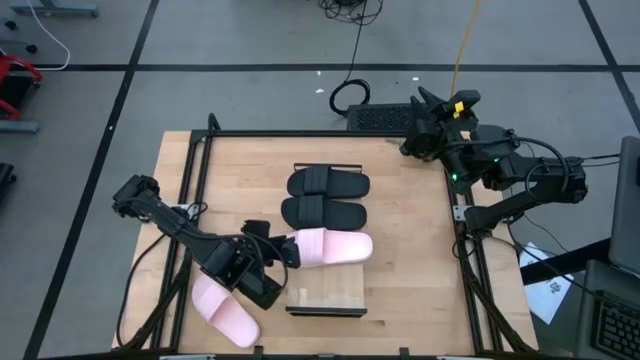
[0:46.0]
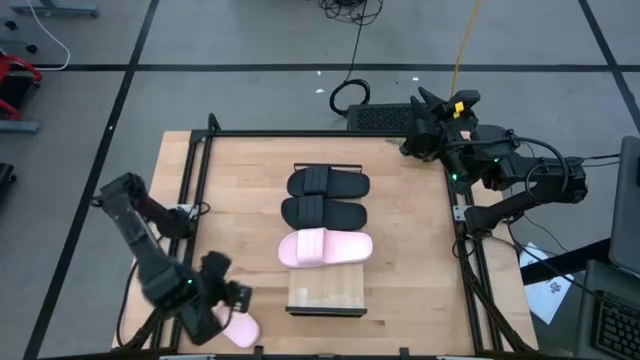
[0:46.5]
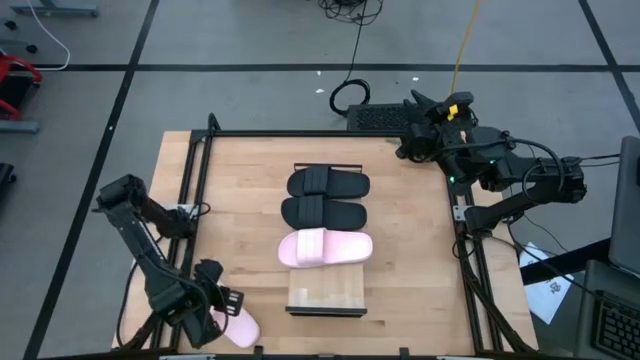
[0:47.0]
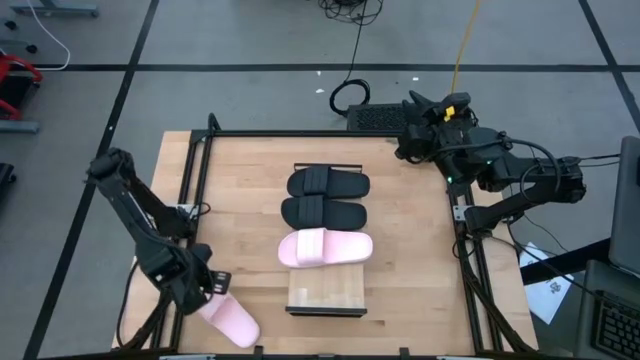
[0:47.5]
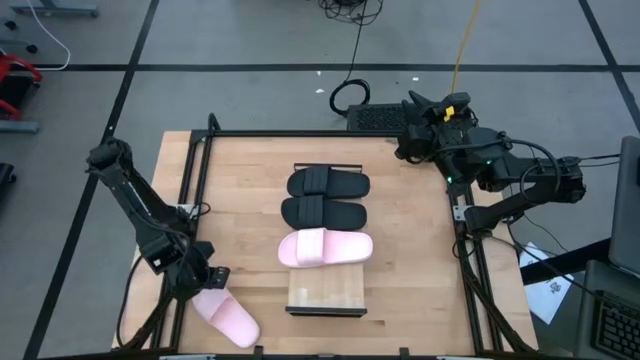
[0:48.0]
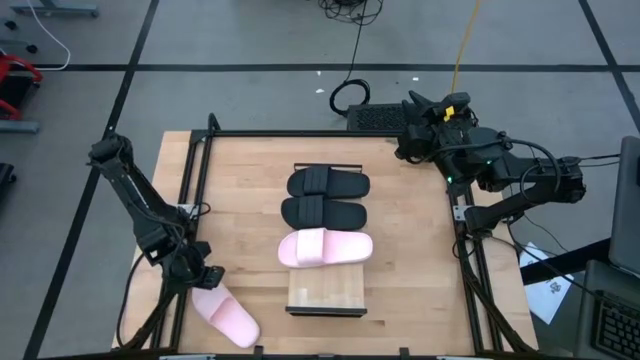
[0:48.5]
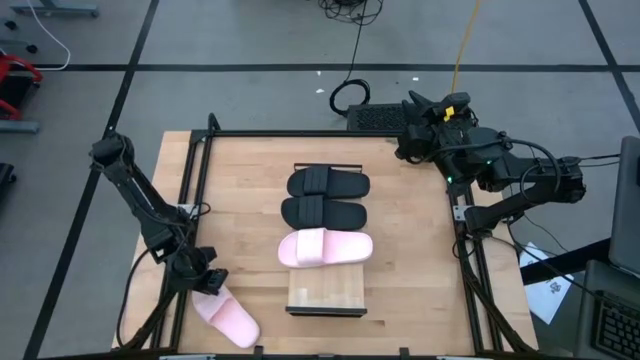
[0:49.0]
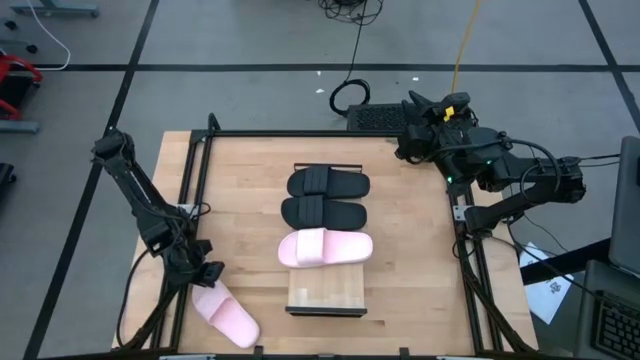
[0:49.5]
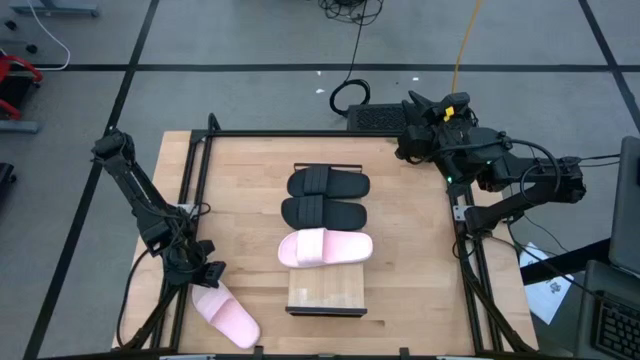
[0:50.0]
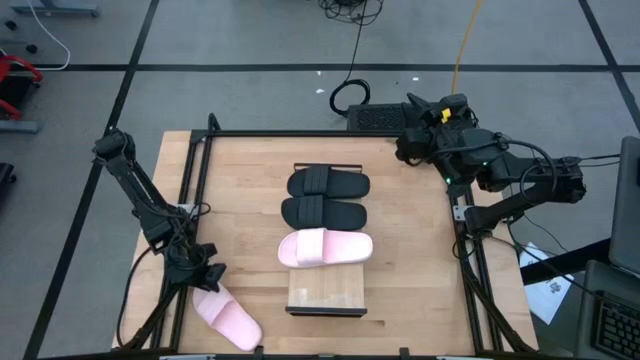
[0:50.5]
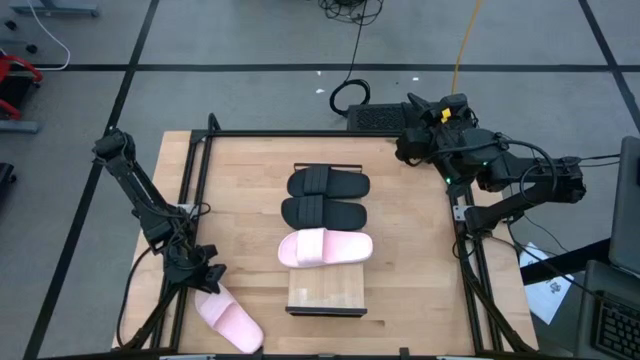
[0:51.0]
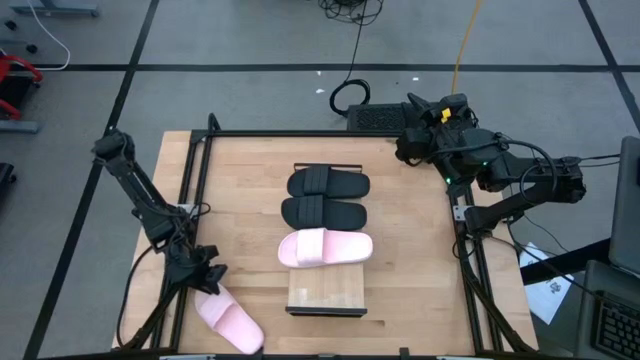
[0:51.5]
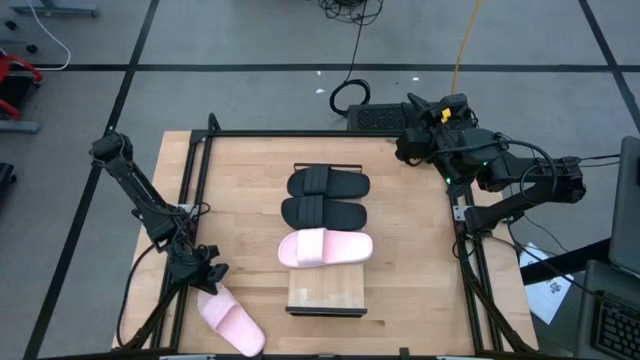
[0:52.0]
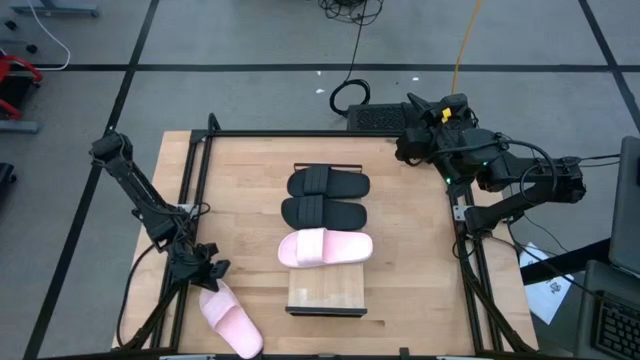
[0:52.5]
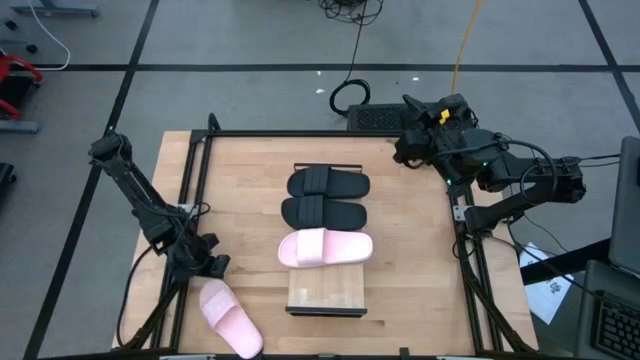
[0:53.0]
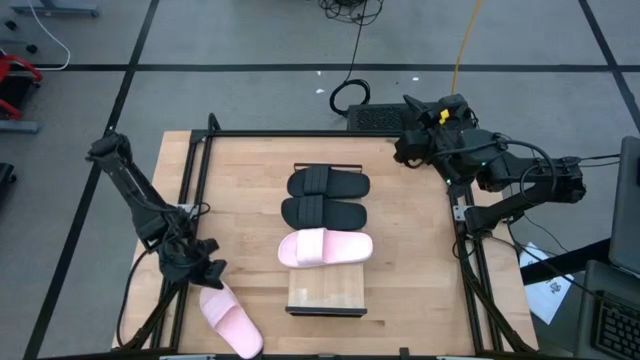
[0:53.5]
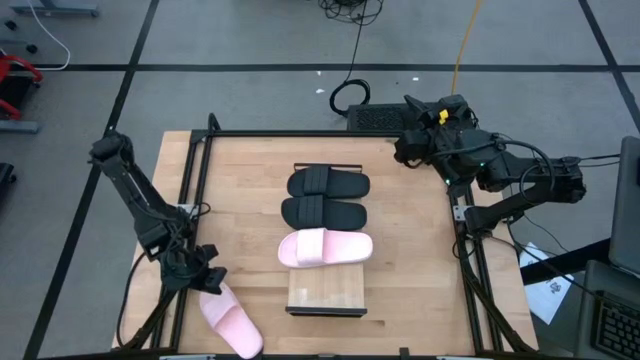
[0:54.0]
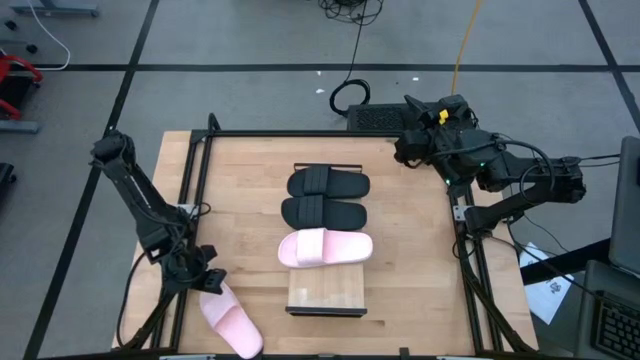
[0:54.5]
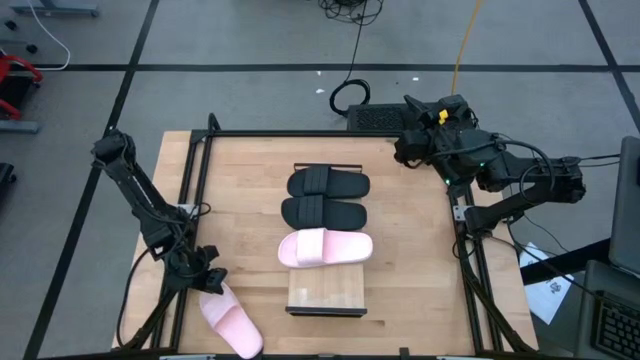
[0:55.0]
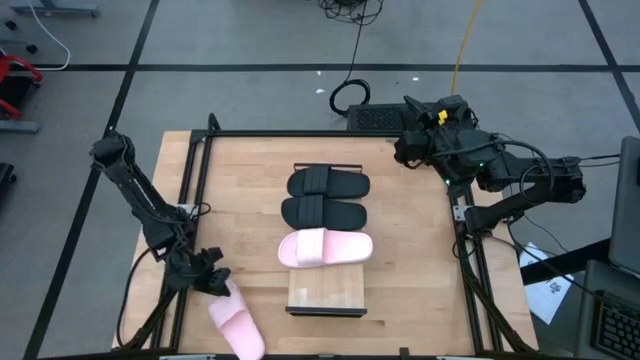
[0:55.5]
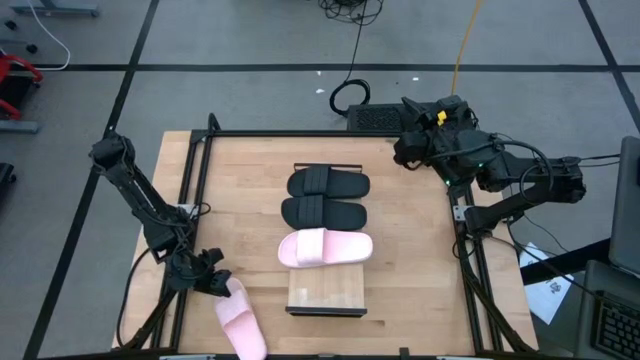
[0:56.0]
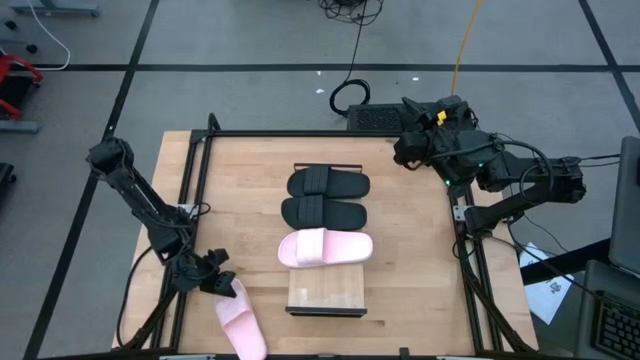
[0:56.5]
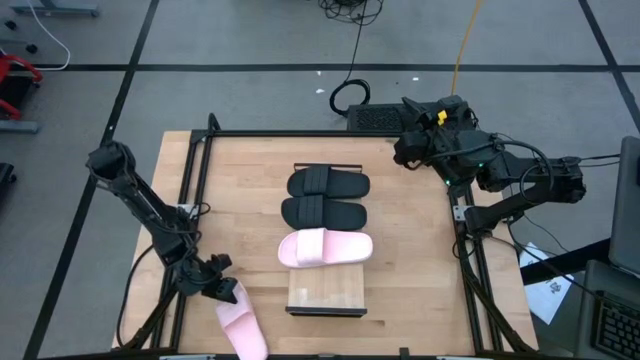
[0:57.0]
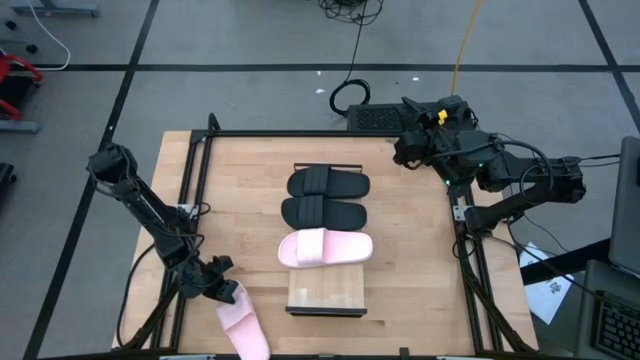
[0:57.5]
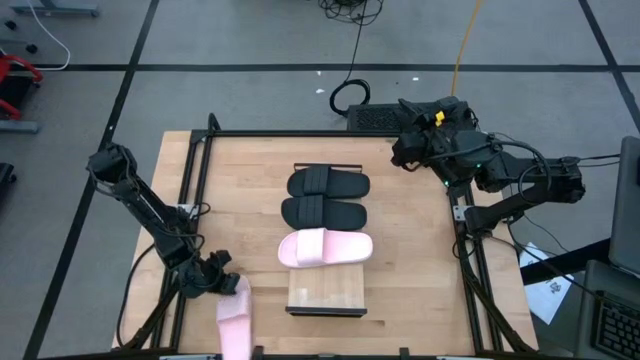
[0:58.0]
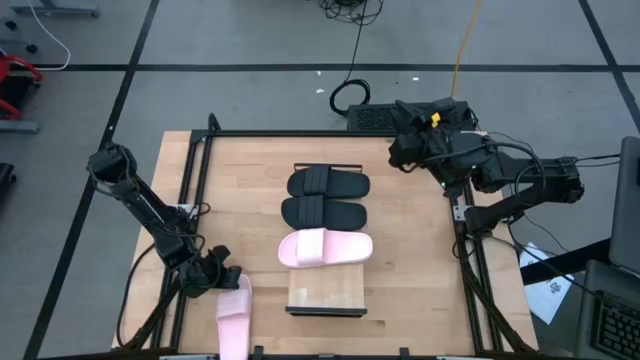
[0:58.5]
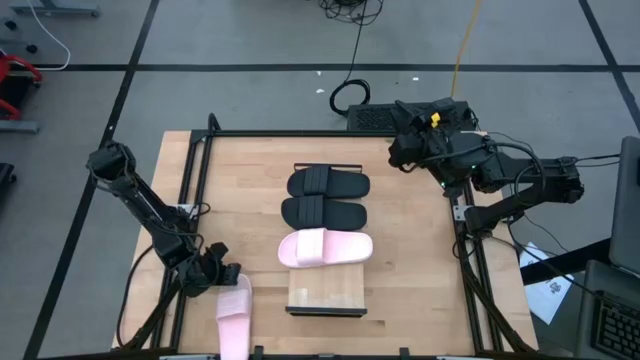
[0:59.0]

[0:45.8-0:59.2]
Task: Pick and place slides into the shelf
Put the pink slide on the shelf

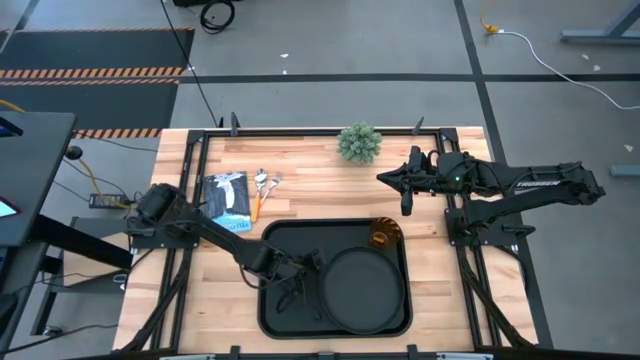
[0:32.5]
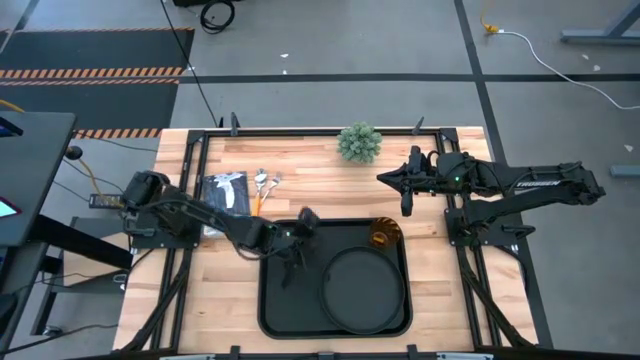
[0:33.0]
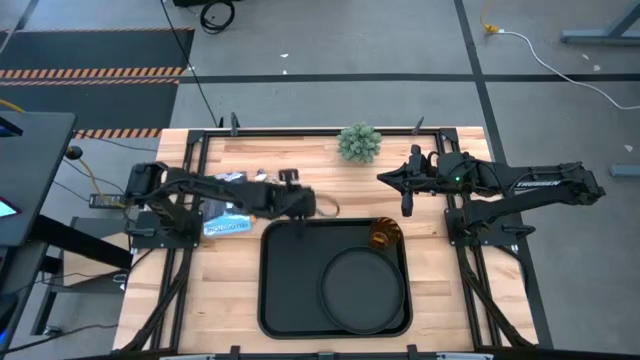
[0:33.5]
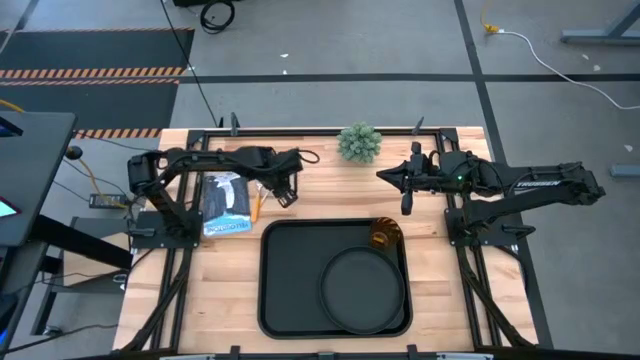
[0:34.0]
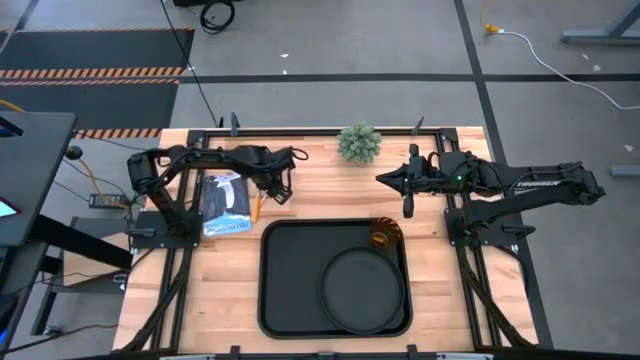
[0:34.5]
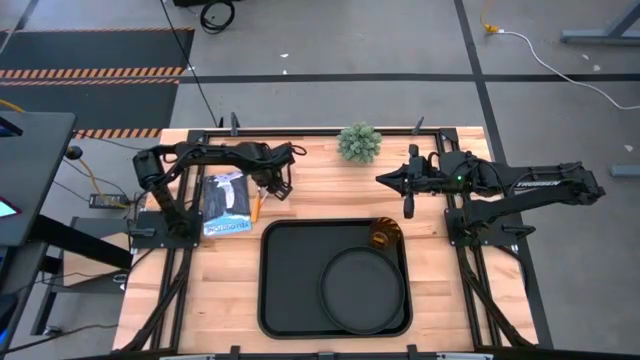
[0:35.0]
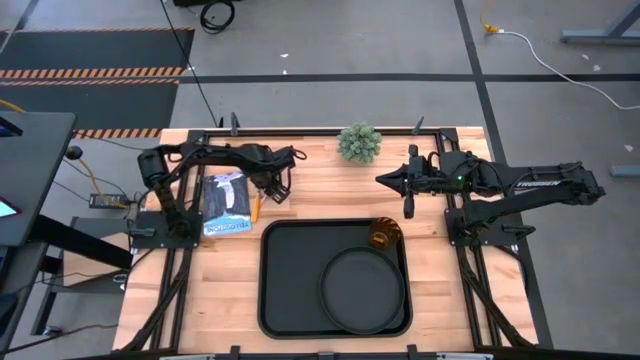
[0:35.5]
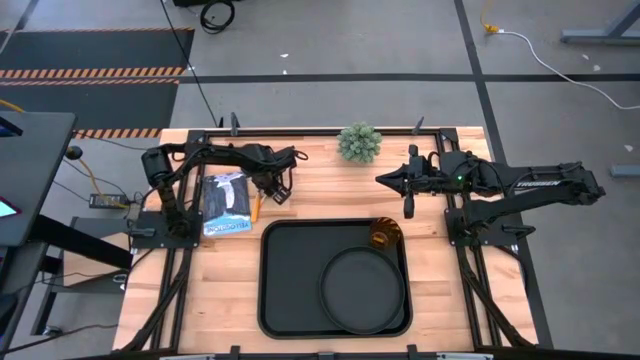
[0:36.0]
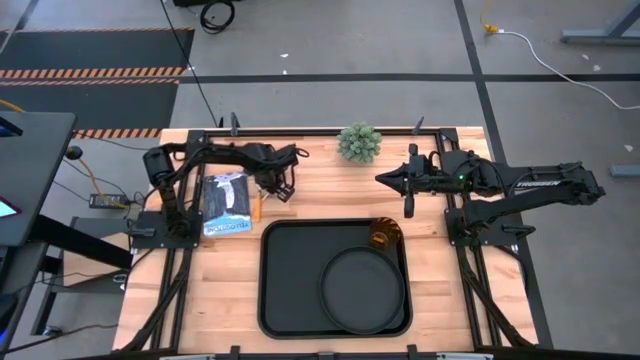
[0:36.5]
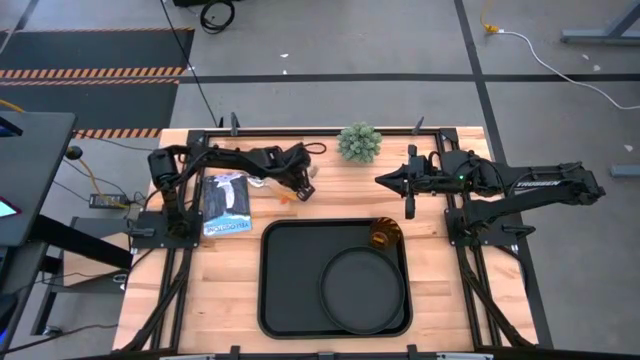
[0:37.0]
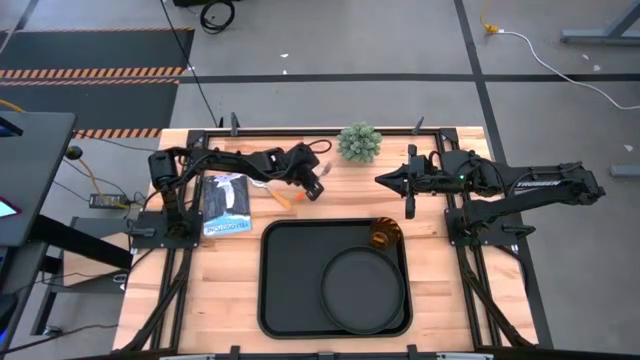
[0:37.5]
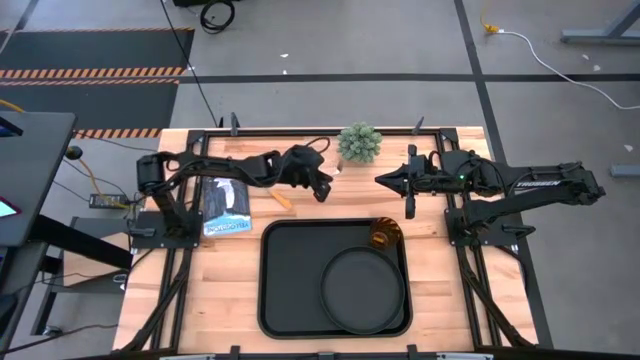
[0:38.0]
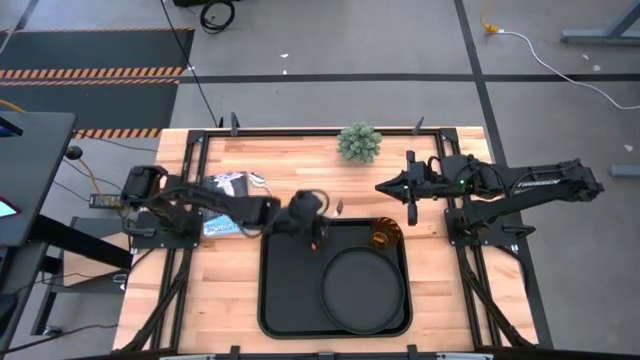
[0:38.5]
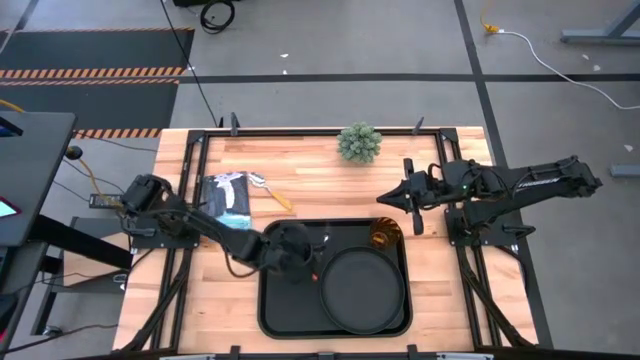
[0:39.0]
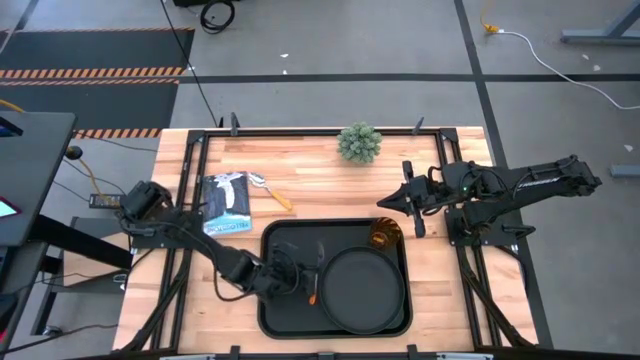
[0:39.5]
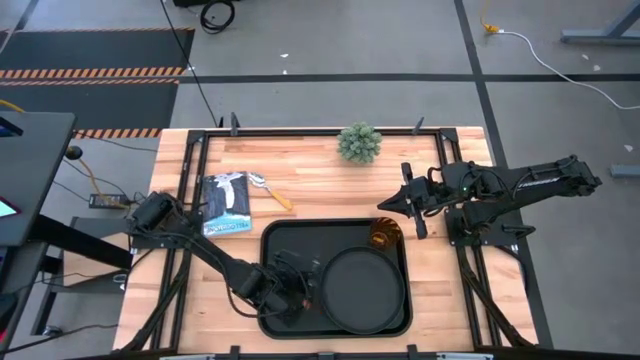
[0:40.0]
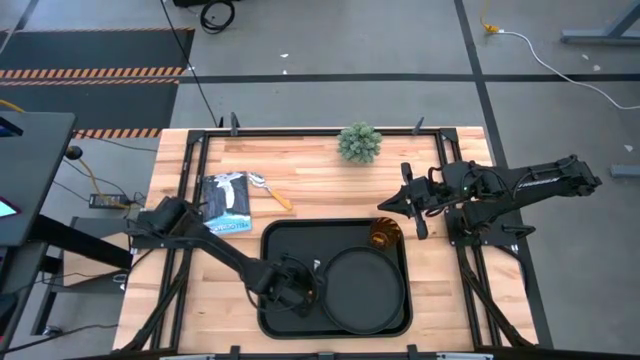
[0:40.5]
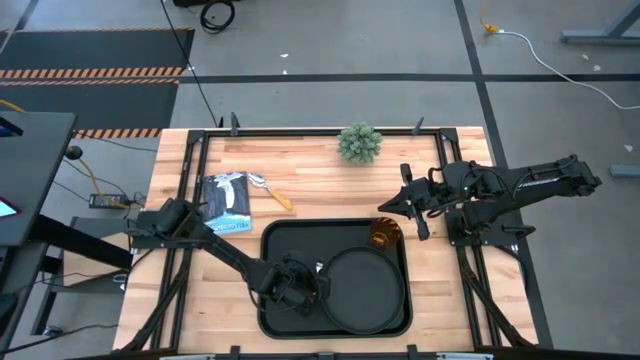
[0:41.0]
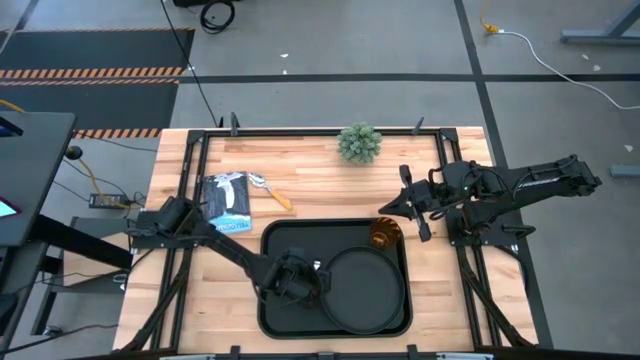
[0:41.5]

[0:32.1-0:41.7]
Task: Pick and place plate/cup/fork/spoon on tray
Put the orange fork to the left of the black plate on the black tray
